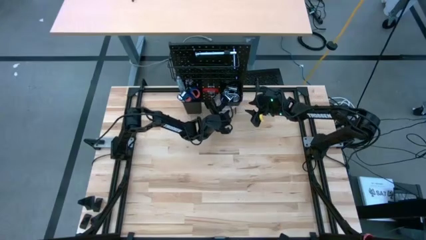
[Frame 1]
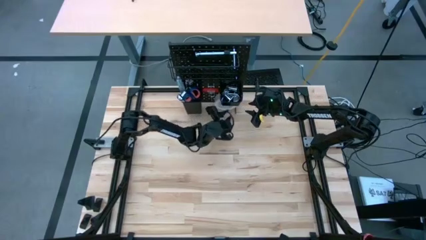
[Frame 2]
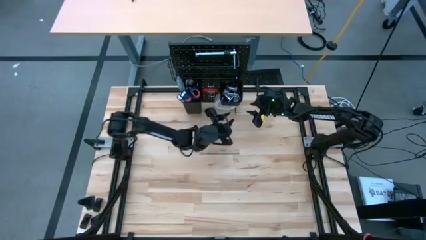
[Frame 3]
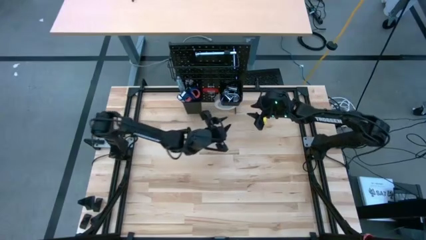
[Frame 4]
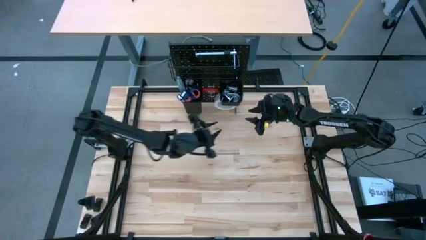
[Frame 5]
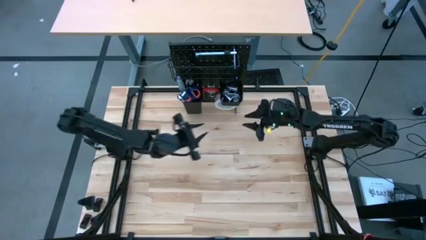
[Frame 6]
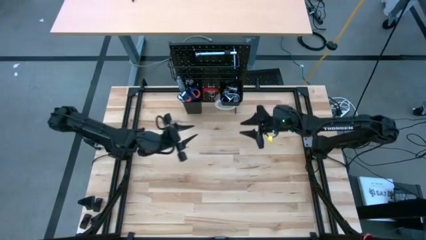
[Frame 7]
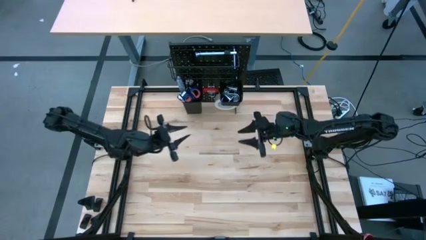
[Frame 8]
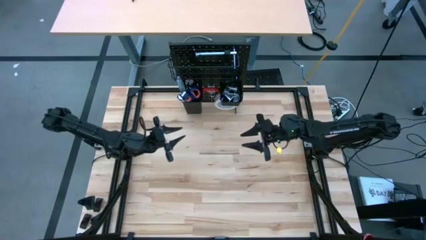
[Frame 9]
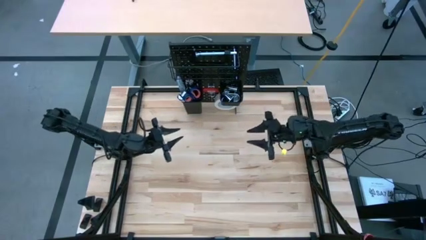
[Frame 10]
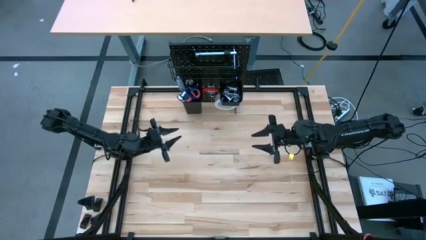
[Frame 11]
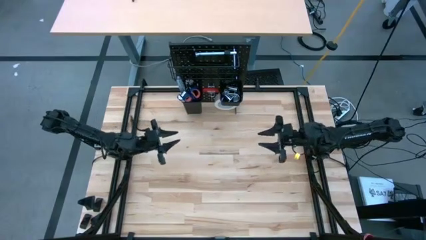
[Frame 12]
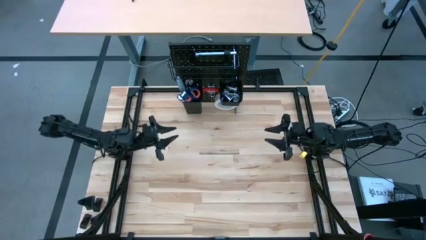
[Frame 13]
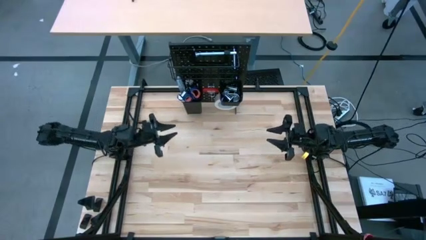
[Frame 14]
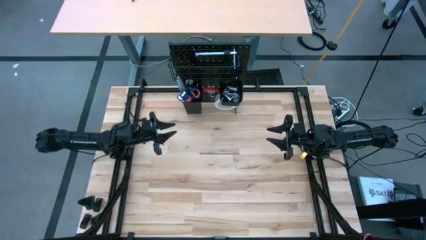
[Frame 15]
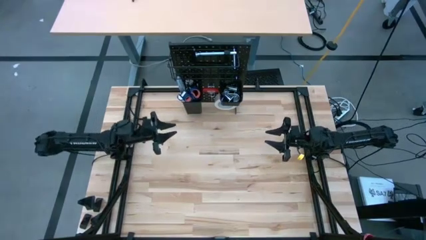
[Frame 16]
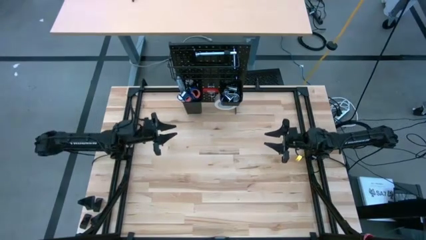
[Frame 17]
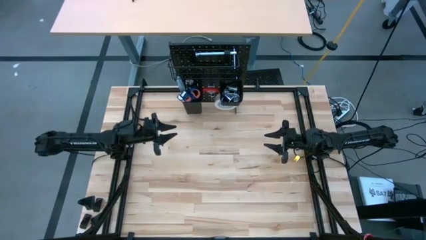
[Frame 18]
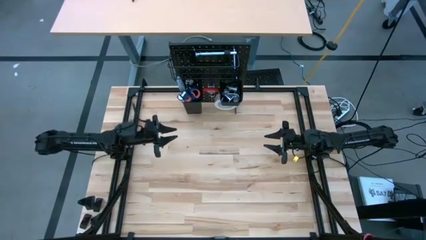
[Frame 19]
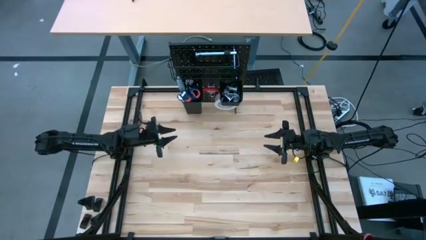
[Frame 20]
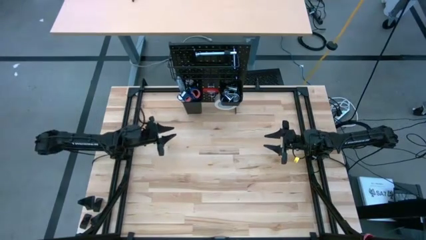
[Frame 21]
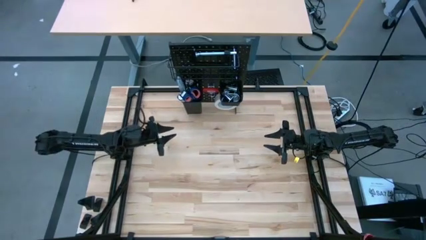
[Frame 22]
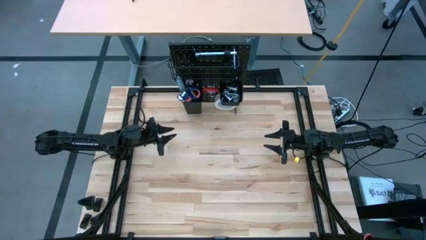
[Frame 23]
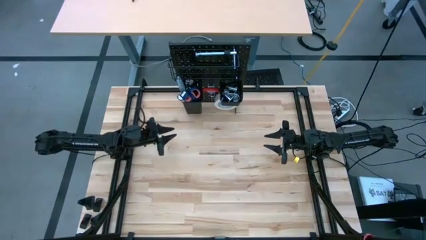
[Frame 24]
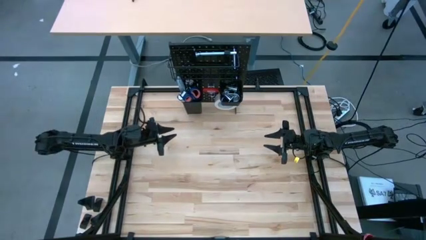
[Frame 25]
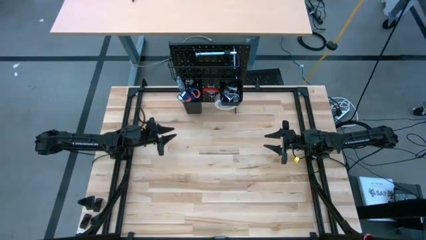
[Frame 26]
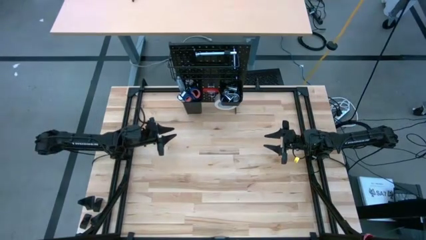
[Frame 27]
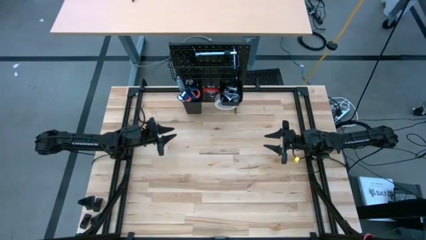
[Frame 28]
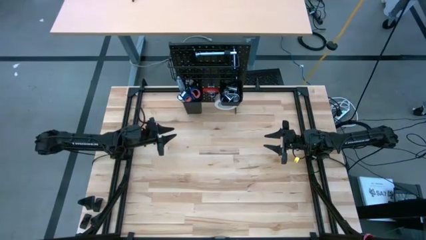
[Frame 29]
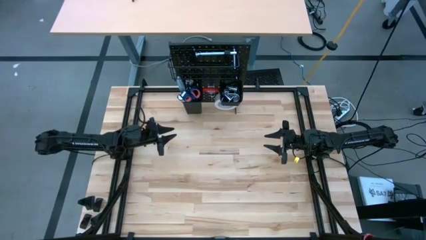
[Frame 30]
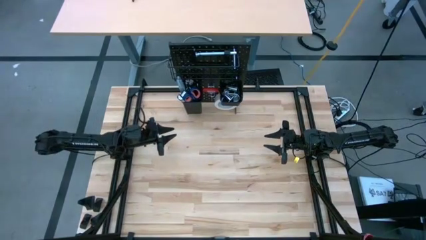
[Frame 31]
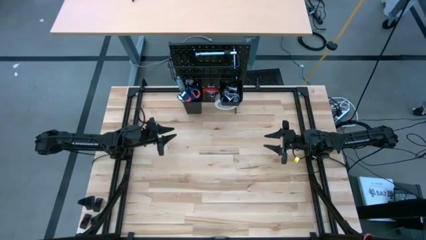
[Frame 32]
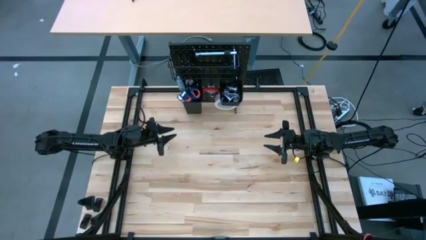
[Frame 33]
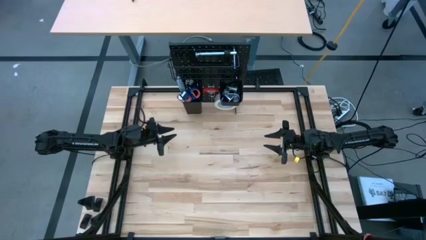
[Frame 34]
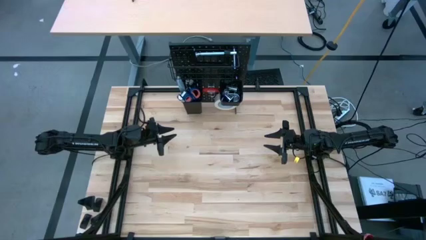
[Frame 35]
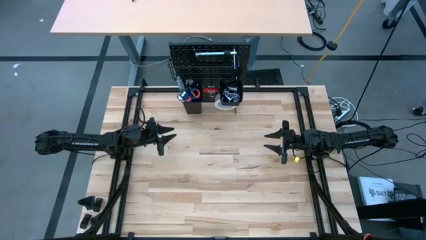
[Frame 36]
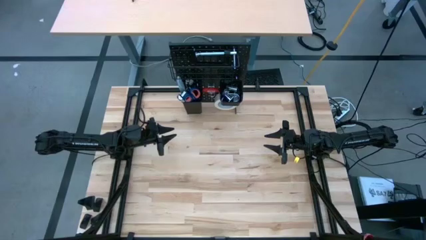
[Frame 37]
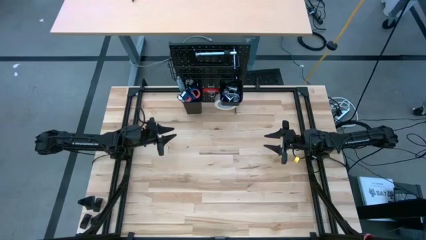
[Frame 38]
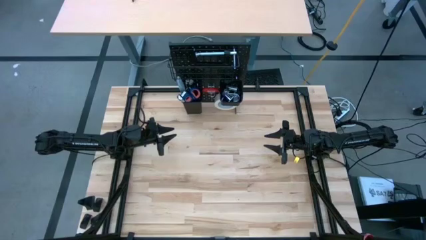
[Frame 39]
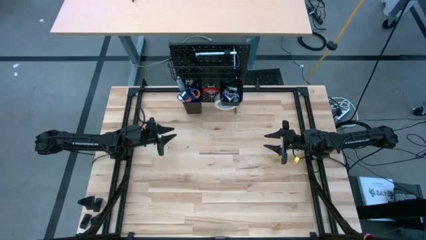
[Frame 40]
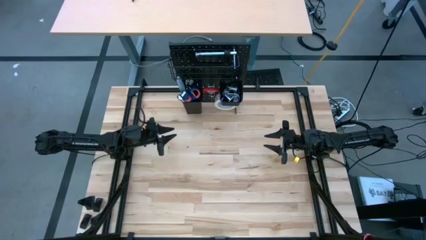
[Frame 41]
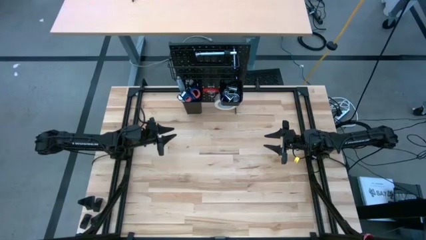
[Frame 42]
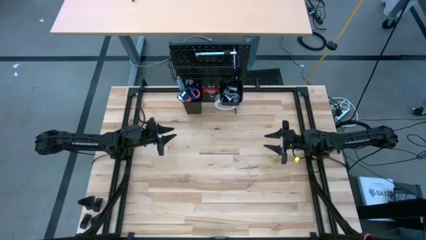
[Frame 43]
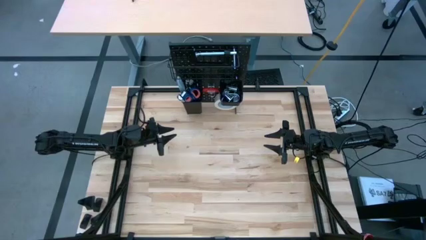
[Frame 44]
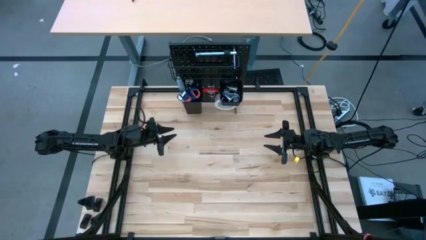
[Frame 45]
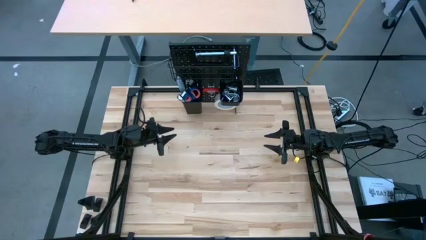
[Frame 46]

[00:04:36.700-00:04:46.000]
Task: Hang tools onto peg board
Return to Home Position
